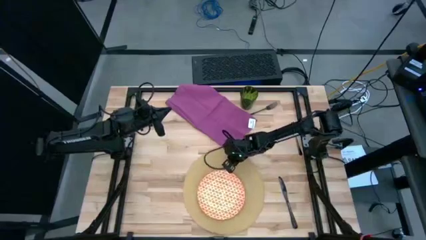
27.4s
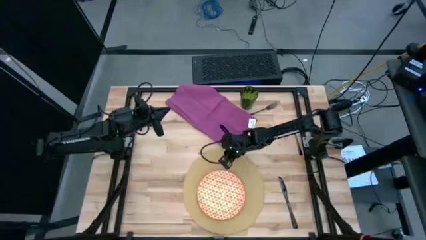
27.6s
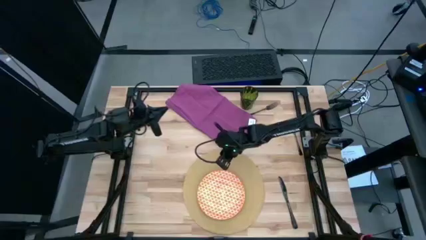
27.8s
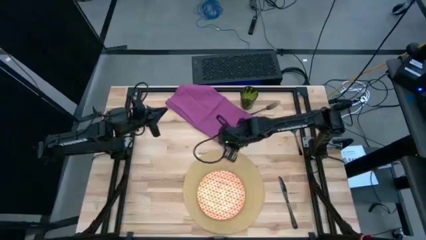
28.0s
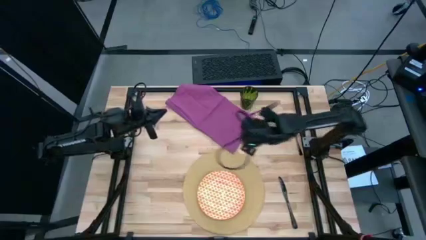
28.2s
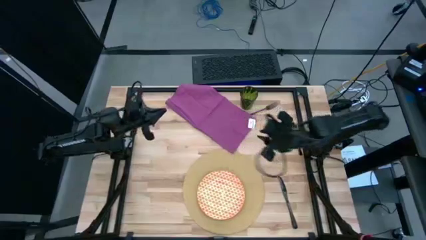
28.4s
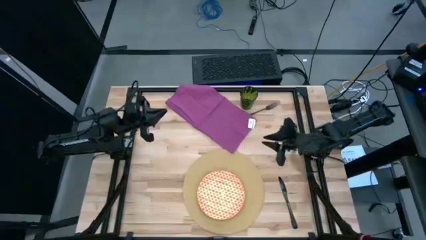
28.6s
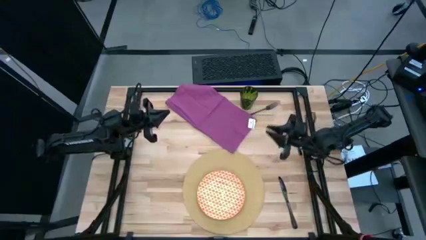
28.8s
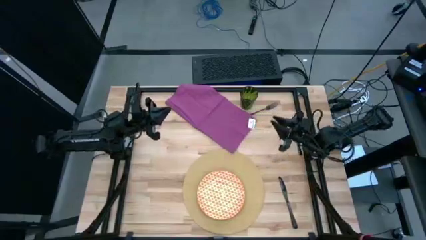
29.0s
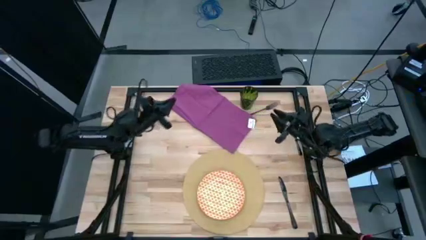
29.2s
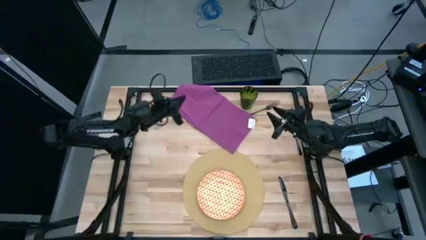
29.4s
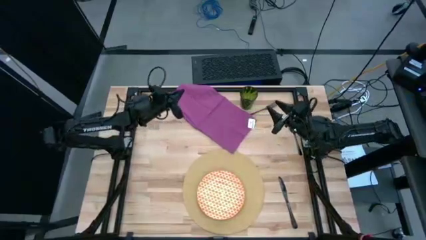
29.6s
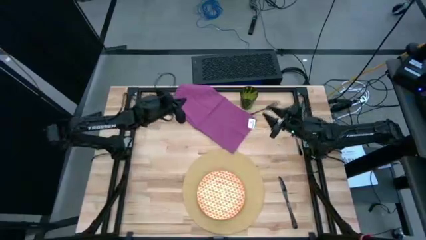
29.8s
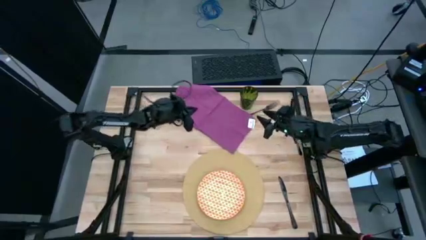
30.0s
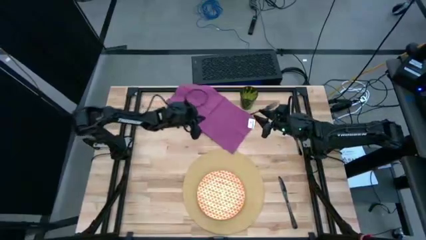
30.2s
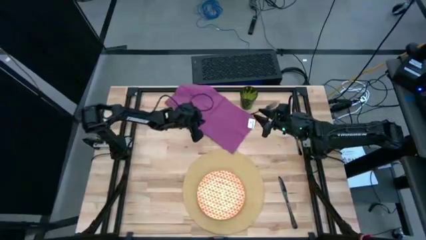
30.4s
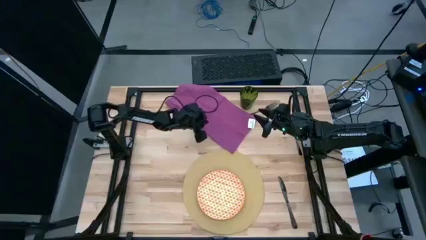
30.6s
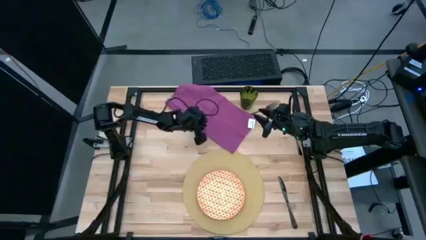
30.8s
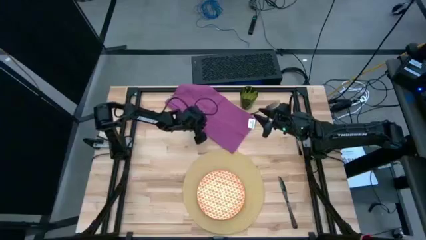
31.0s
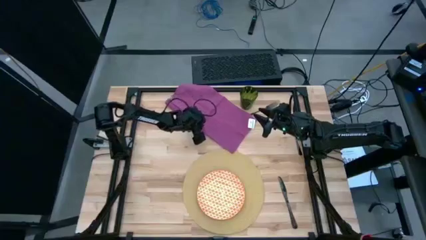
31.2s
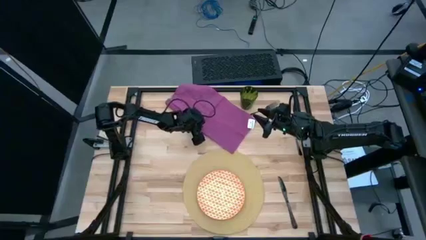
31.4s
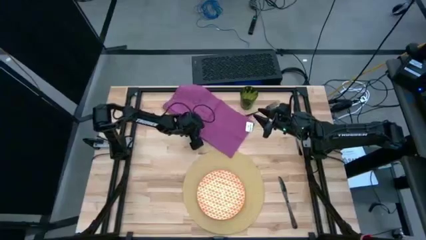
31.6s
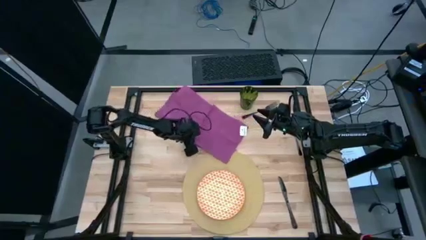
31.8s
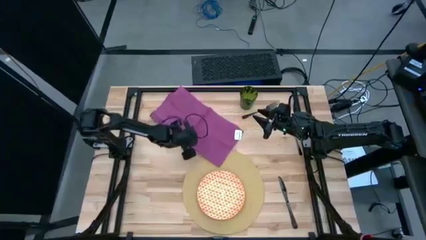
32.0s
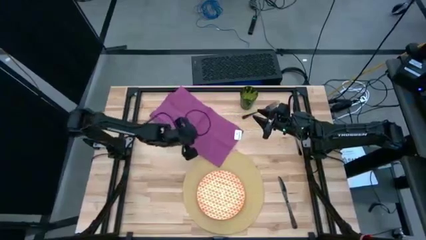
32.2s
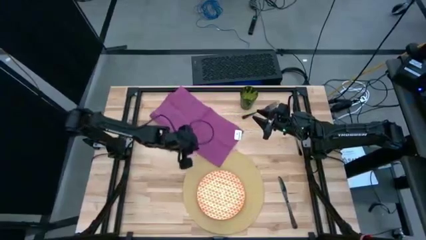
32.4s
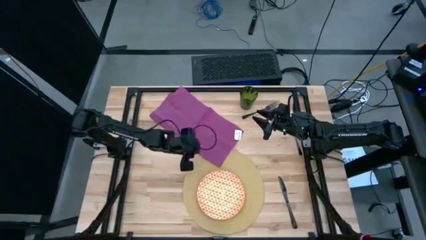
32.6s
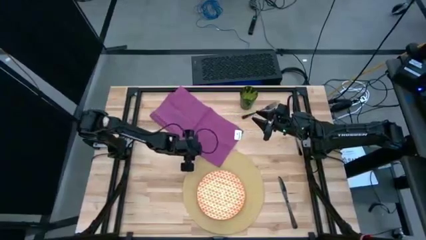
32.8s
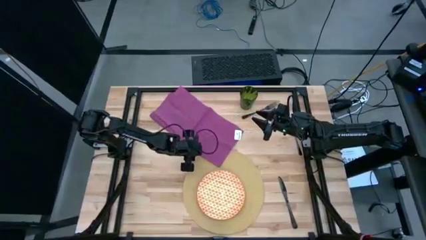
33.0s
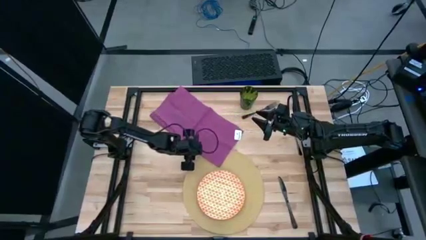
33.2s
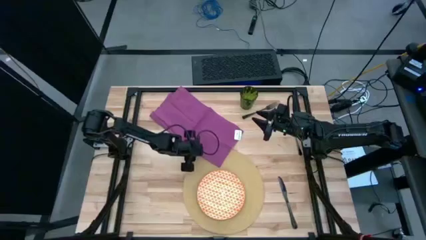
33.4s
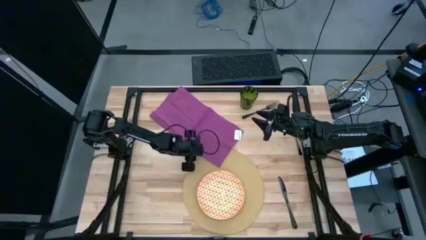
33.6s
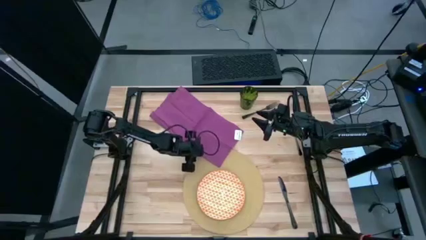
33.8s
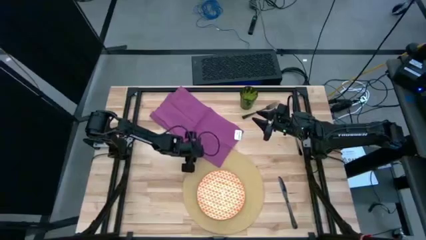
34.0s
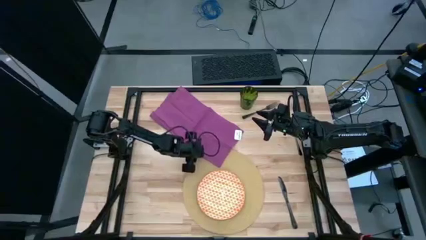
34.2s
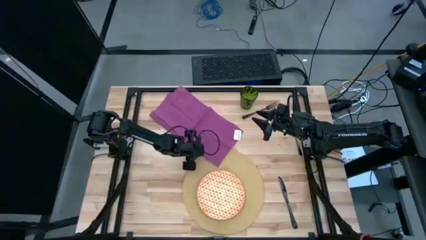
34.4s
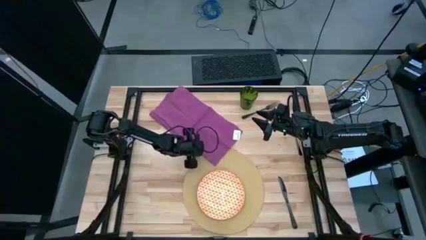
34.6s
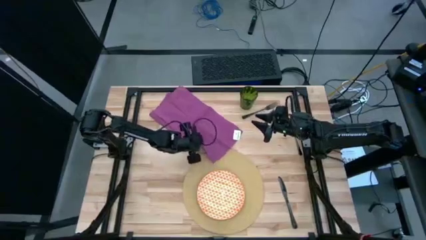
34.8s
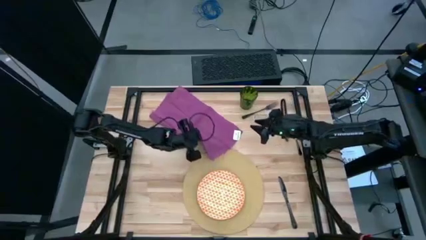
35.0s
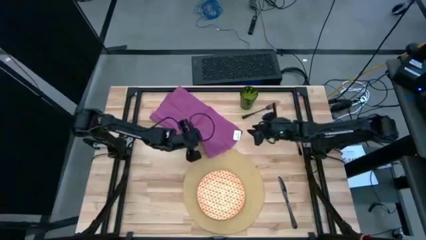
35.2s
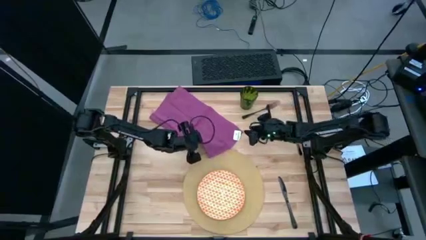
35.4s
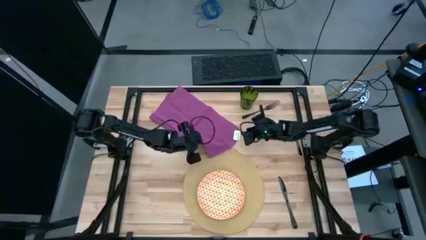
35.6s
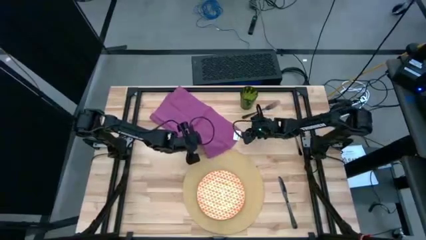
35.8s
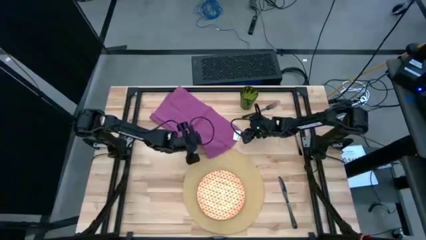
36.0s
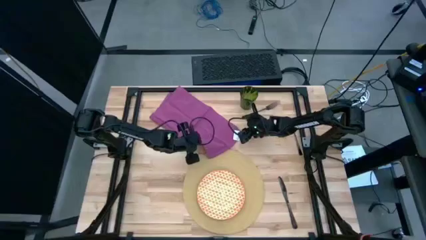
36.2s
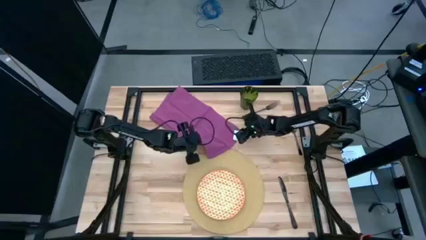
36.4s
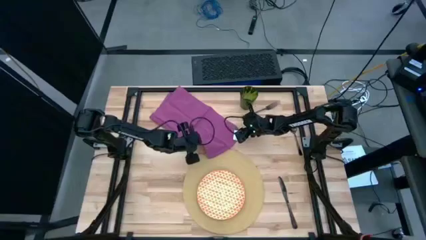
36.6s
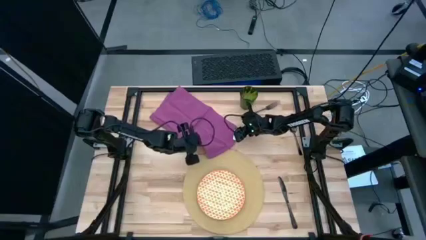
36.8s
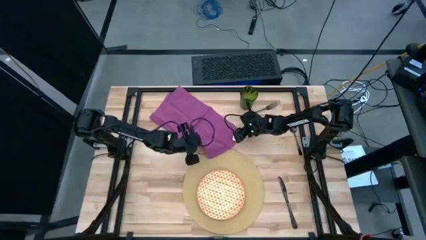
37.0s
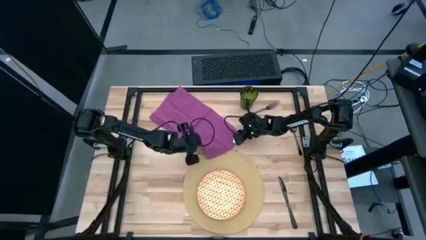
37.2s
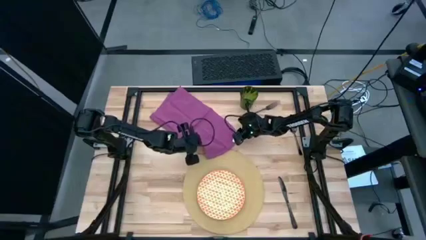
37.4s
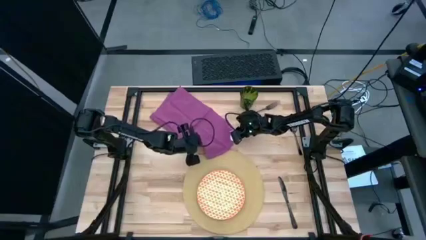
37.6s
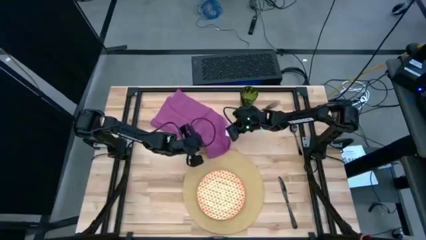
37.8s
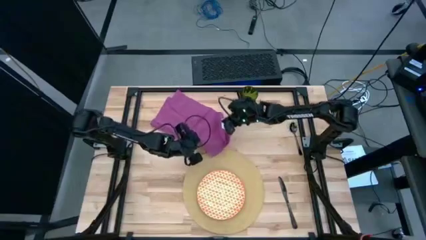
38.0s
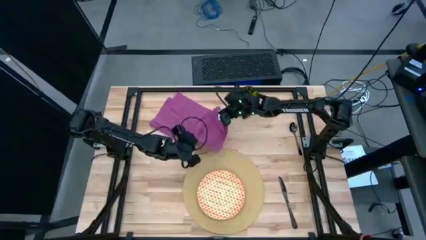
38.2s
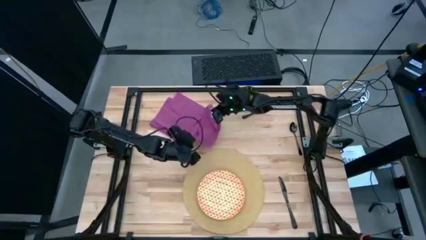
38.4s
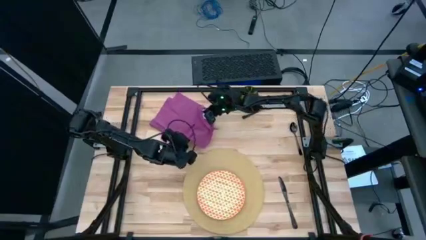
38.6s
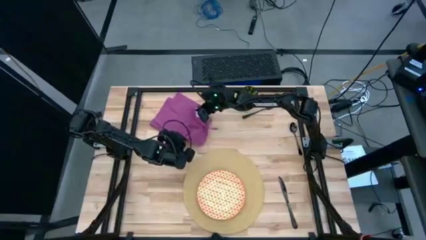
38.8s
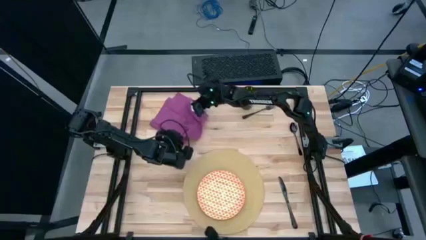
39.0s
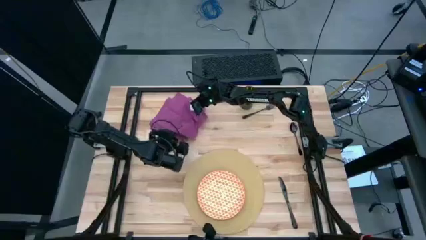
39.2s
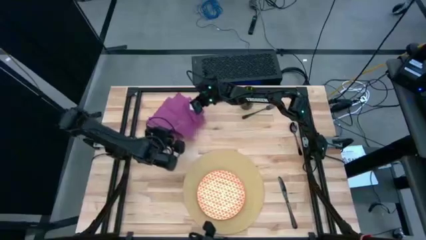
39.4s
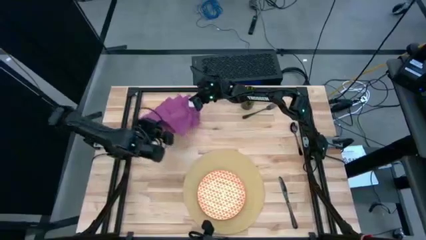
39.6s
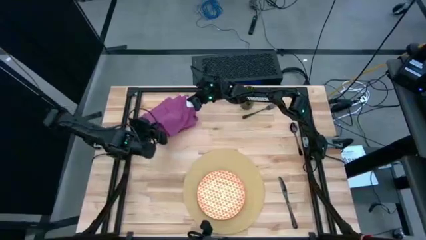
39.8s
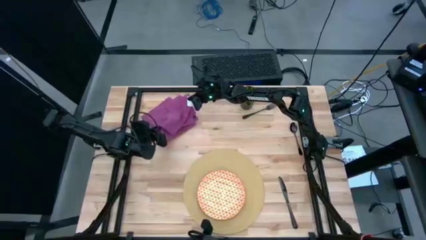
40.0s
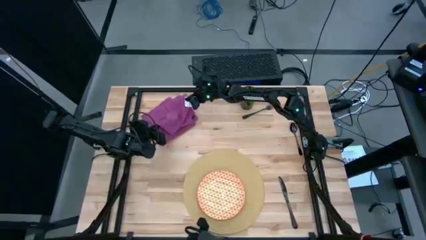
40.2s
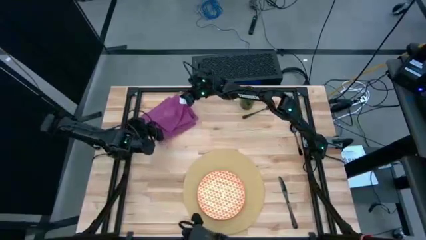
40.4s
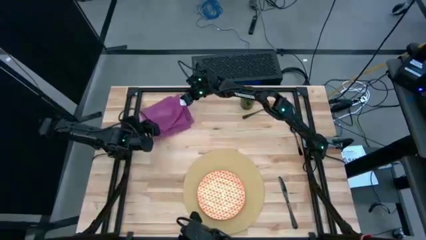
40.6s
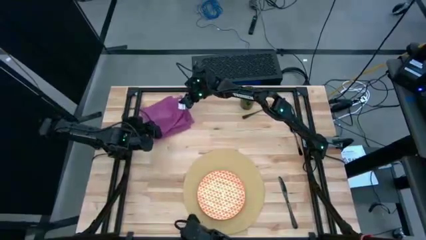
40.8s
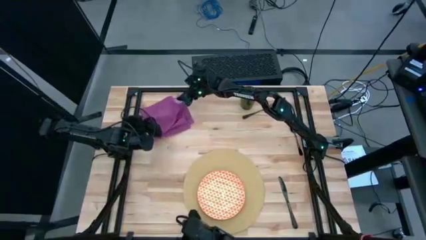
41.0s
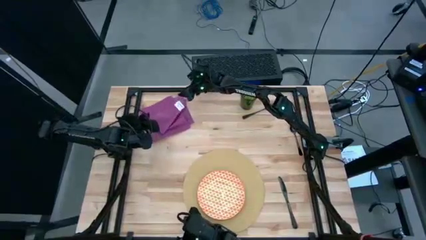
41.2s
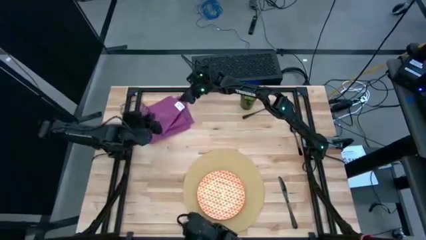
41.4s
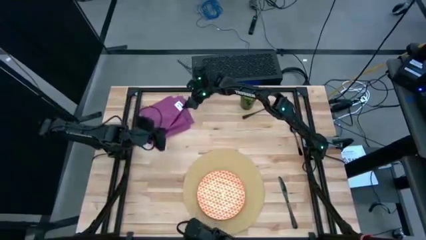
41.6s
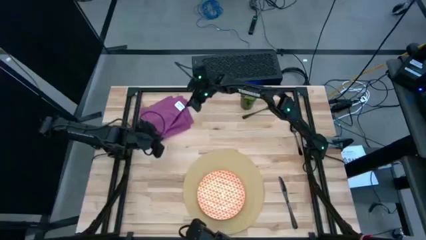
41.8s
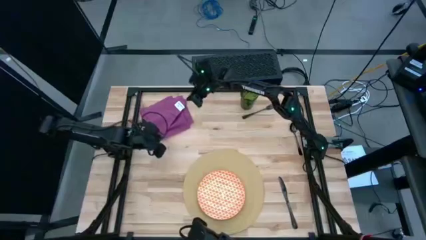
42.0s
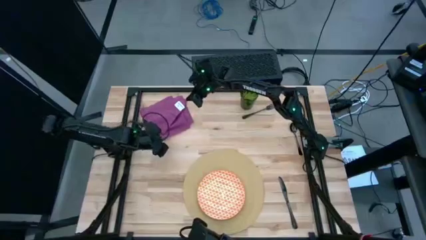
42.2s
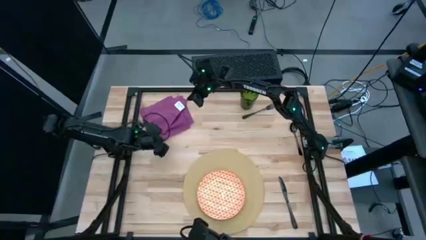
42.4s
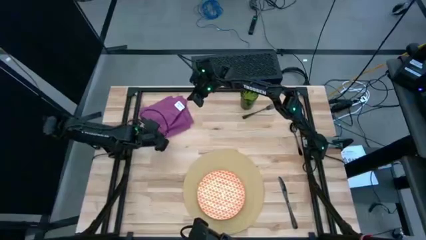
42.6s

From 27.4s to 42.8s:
Task: Set table place
Fold the purple table napkin
